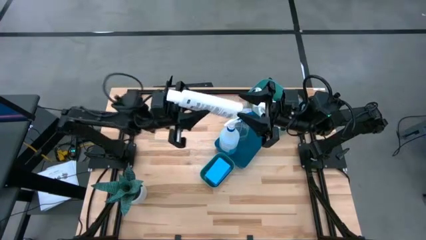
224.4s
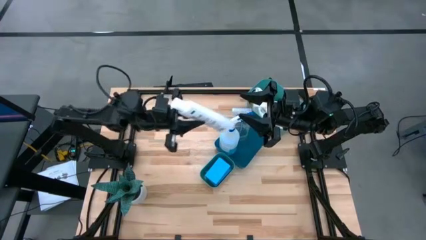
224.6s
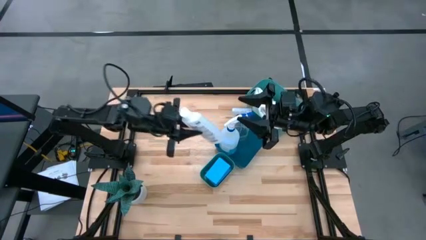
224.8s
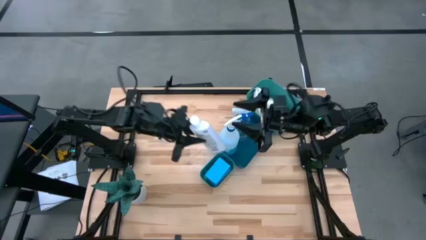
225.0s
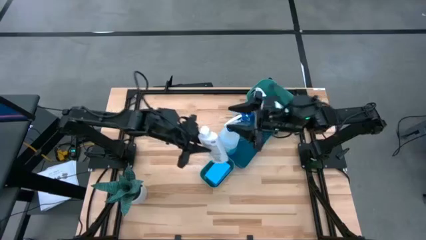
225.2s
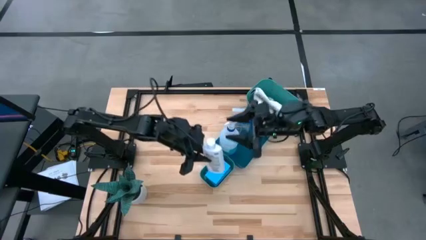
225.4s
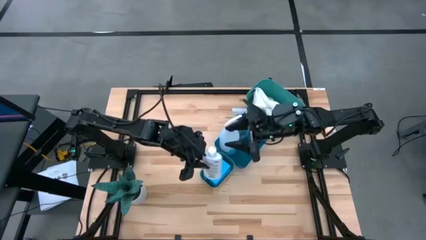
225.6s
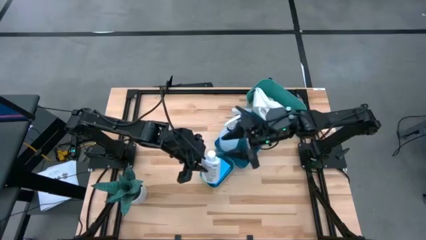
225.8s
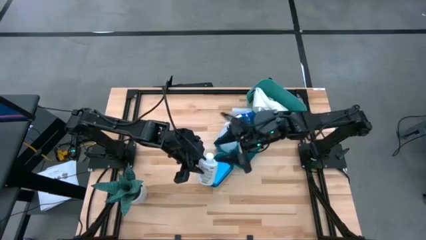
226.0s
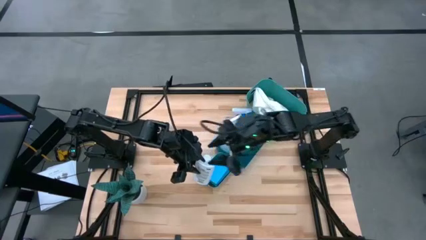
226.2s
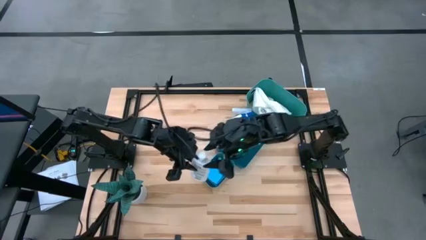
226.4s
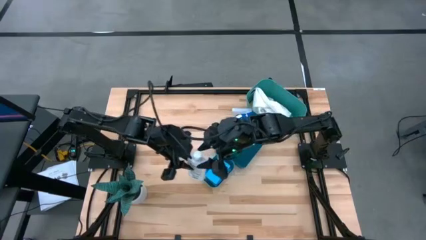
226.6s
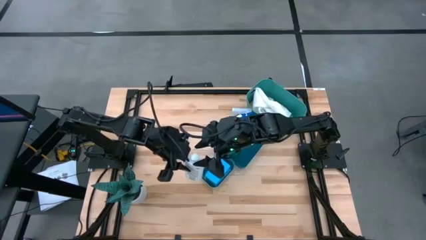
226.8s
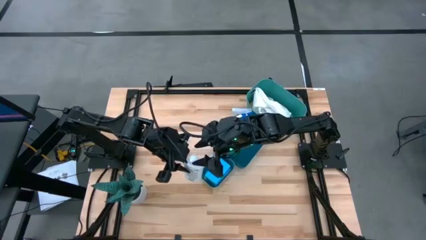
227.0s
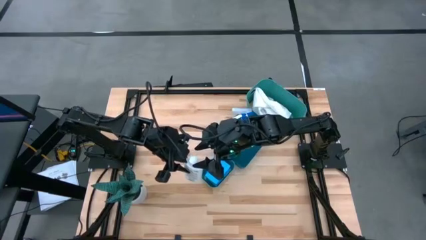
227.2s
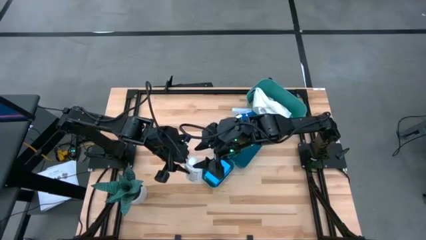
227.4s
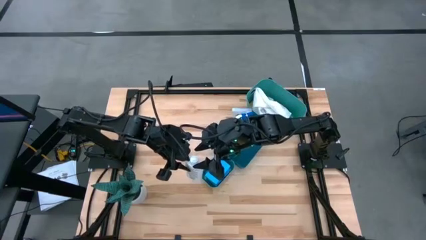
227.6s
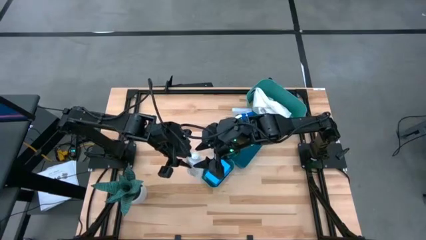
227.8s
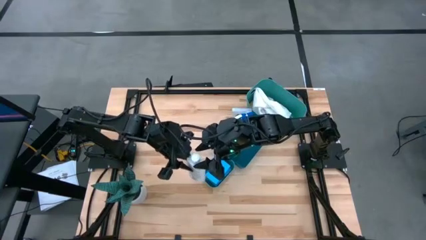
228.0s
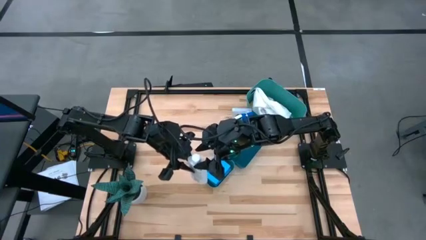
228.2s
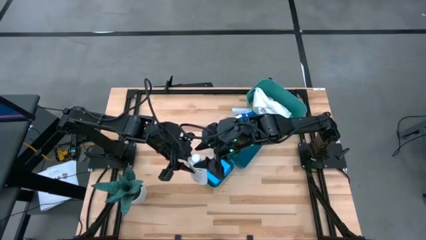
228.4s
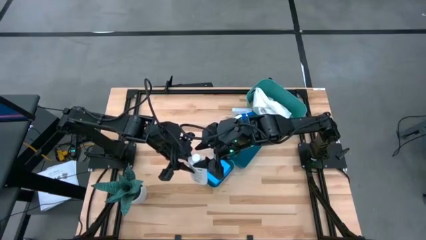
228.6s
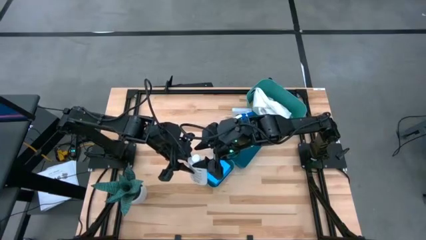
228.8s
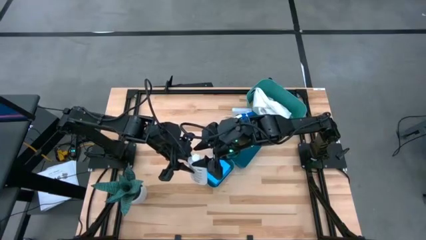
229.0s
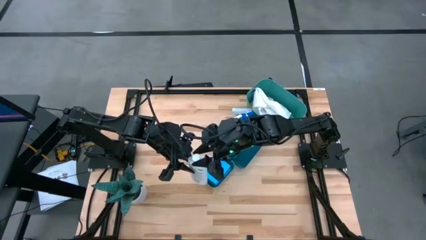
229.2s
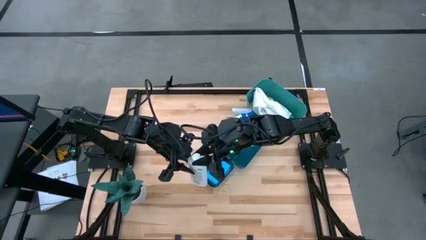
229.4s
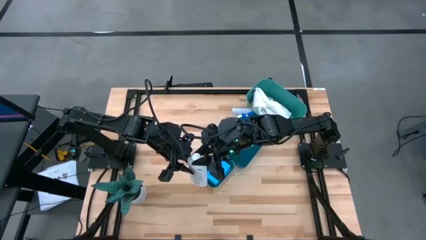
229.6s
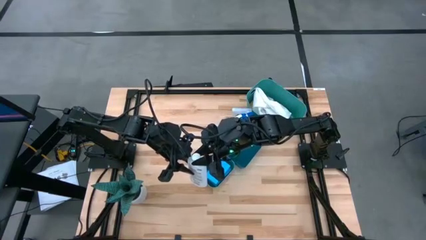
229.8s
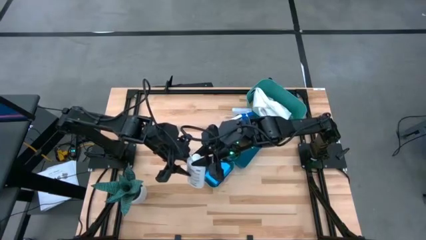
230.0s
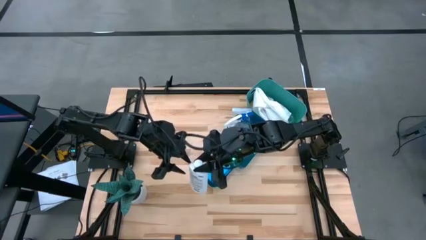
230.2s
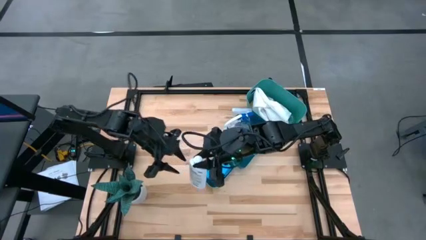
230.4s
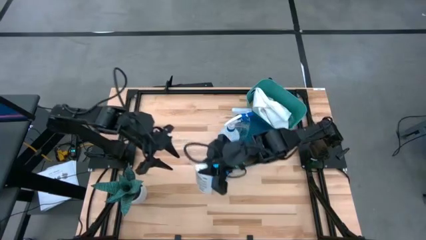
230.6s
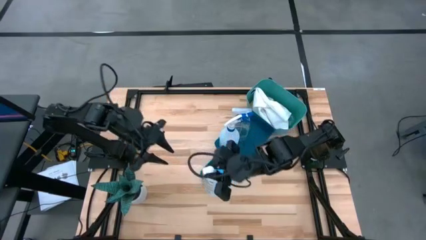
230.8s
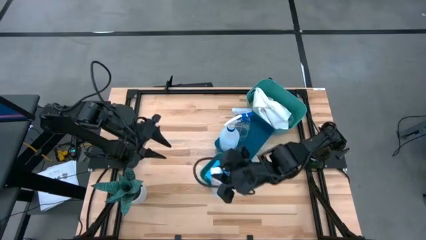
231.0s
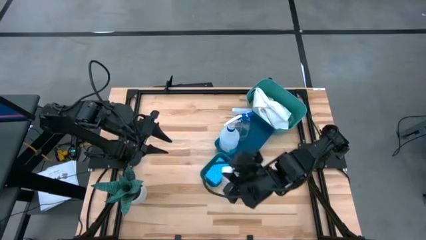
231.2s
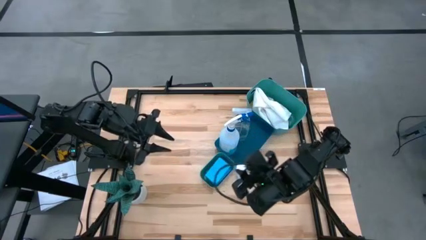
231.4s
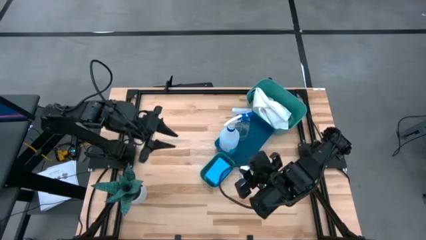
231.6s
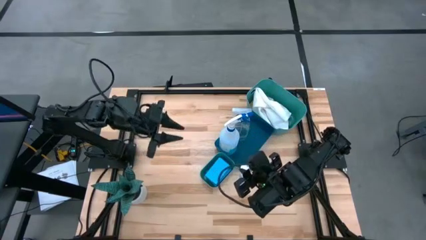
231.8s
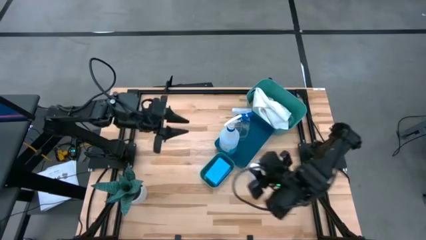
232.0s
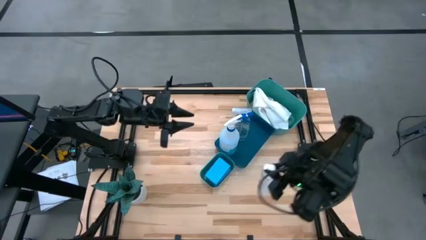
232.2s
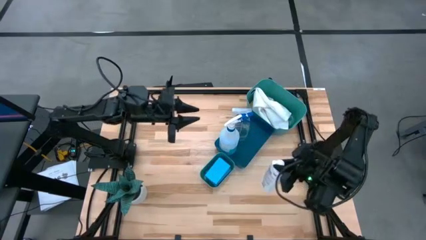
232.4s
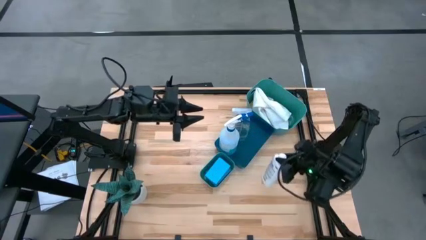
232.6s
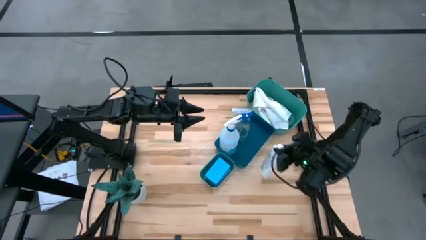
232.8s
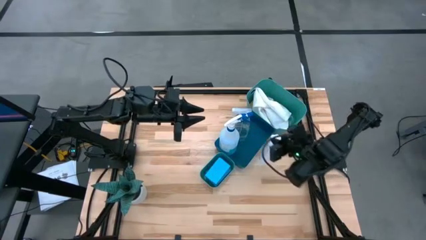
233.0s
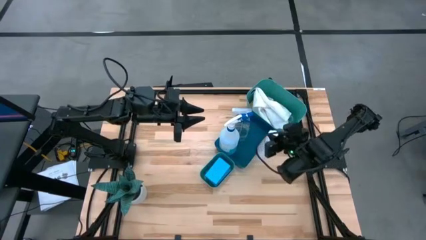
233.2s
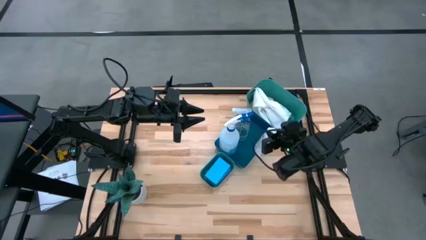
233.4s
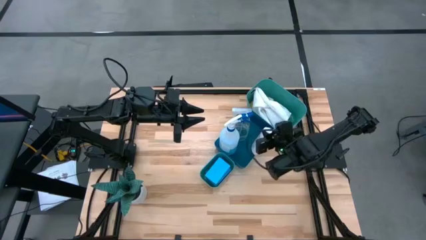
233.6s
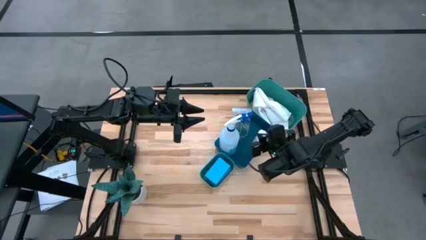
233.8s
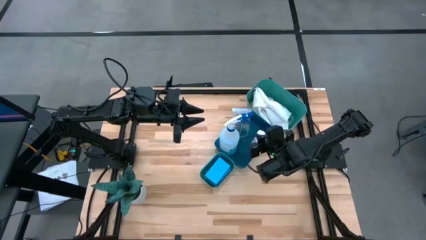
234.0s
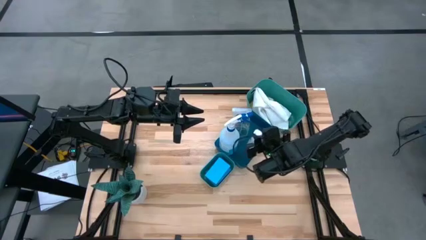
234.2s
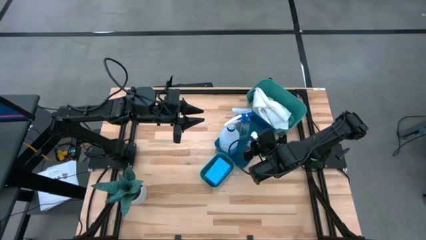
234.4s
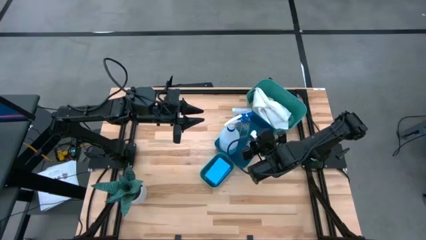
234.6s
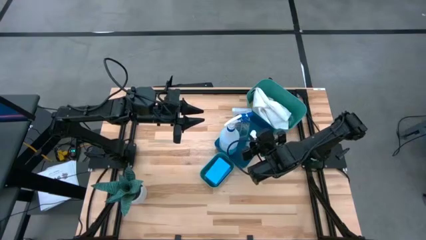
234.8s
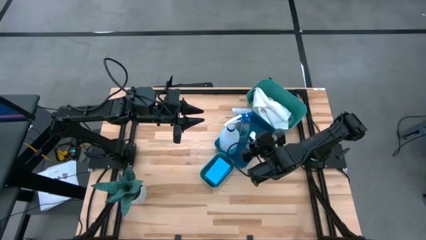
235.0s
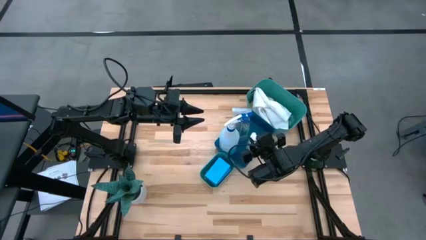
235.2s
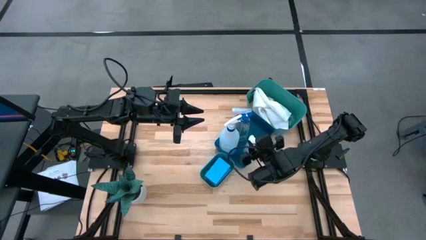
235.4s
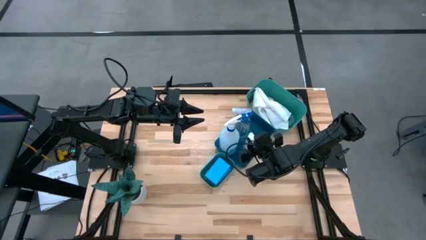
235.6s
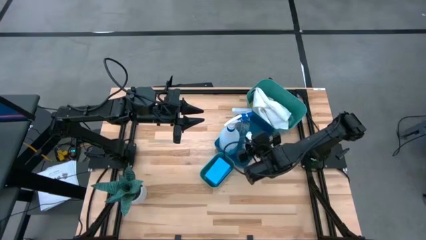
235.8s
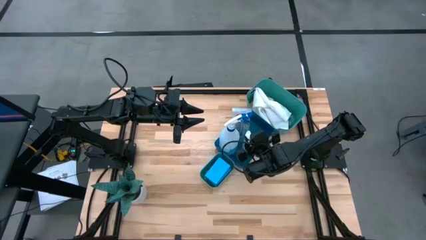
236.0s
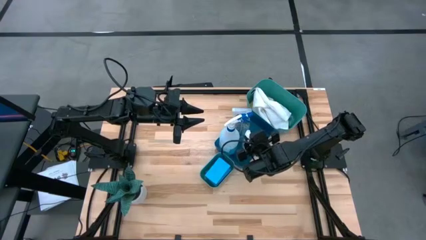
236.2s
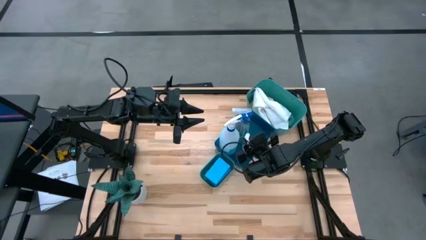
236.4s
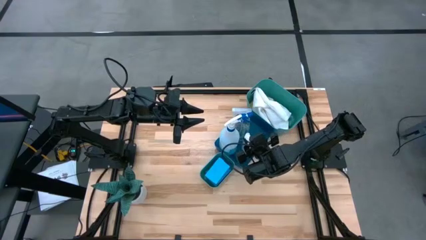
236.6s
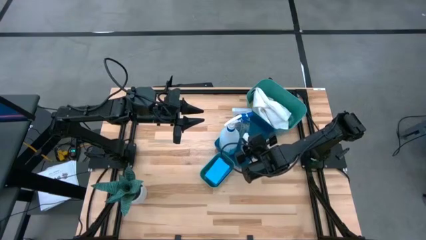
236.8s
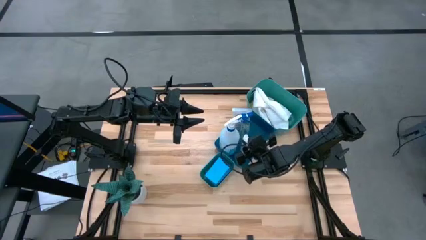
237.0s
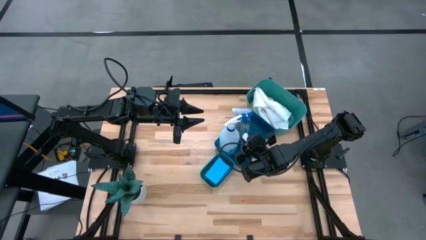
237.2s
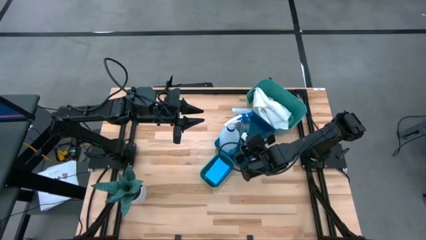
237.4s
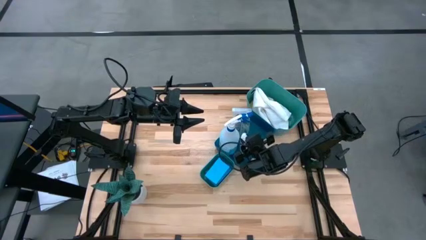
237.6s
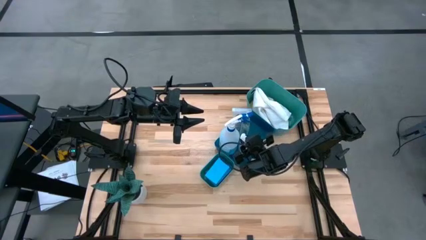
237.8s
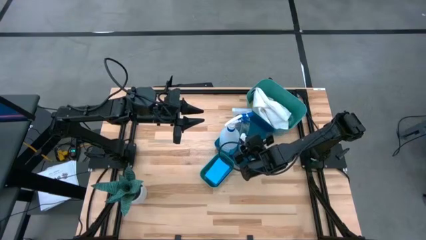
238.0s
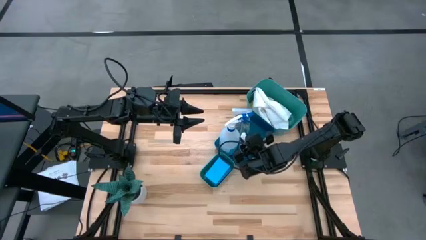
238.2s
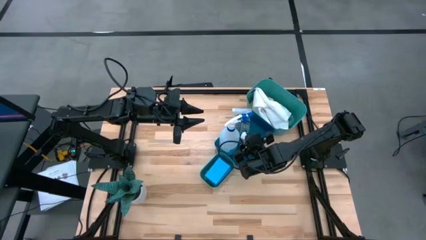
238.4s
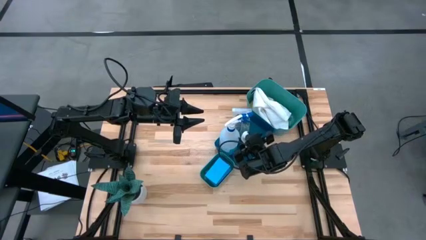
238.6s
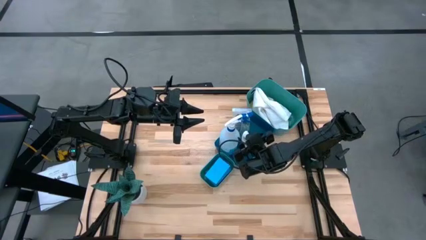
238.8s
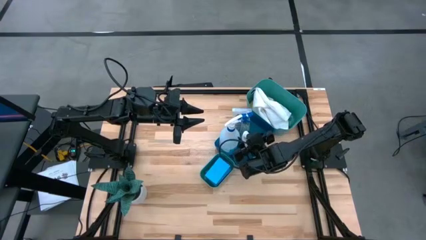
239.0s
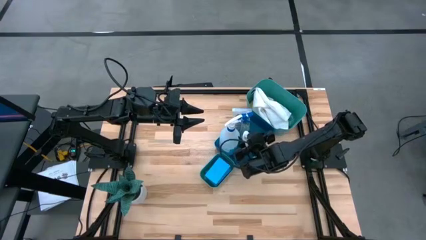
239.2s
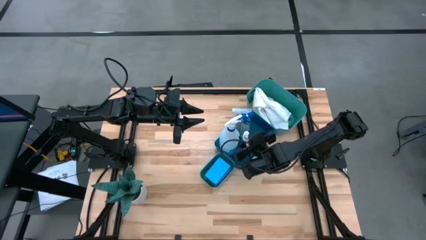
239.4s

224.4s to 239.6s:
Task: Pick & Place Kitchen Items
Put the white plastic restorer bottle into the large blue bin
